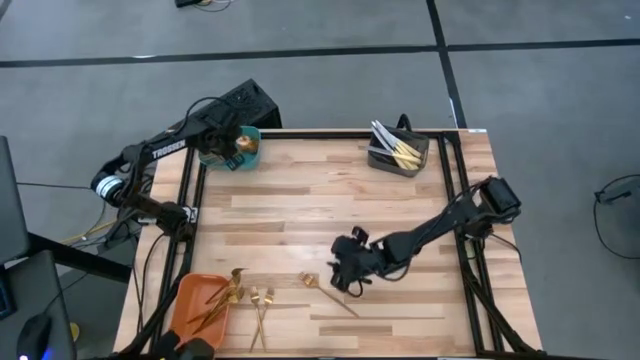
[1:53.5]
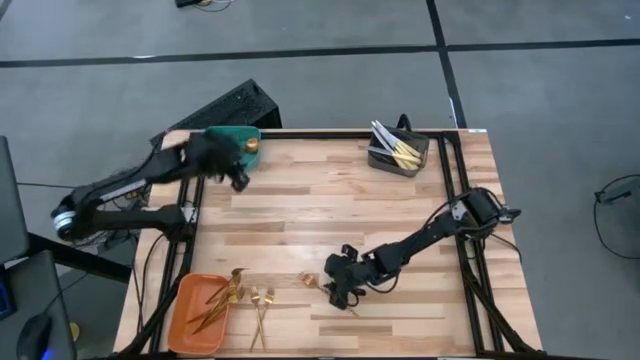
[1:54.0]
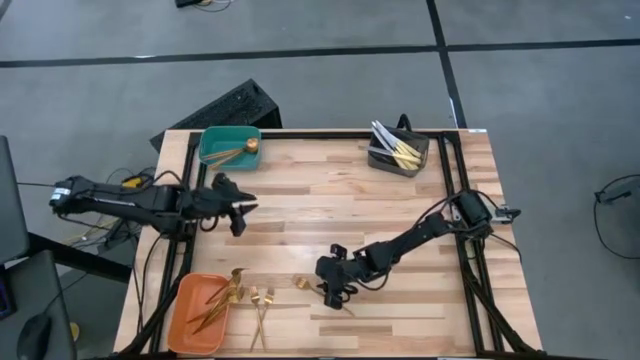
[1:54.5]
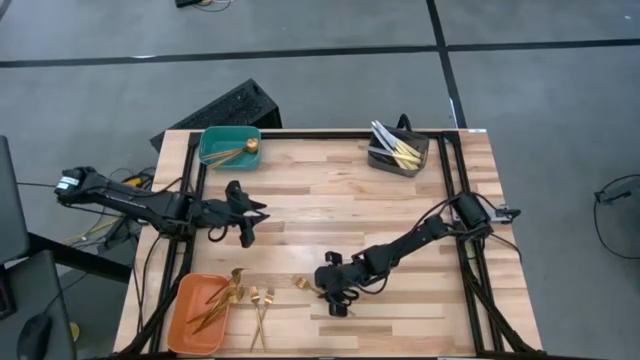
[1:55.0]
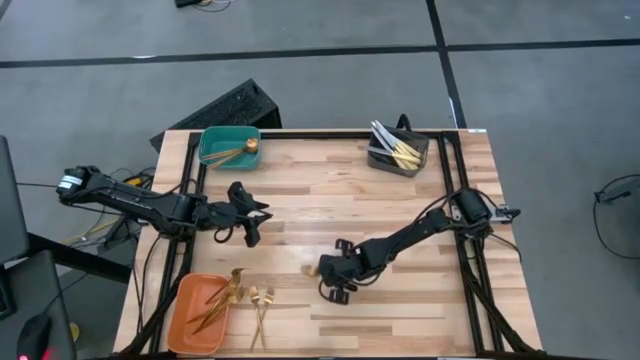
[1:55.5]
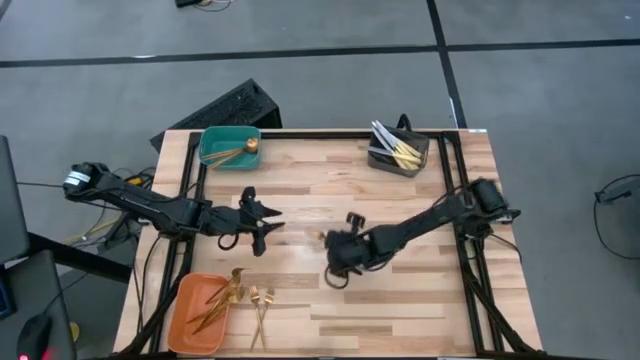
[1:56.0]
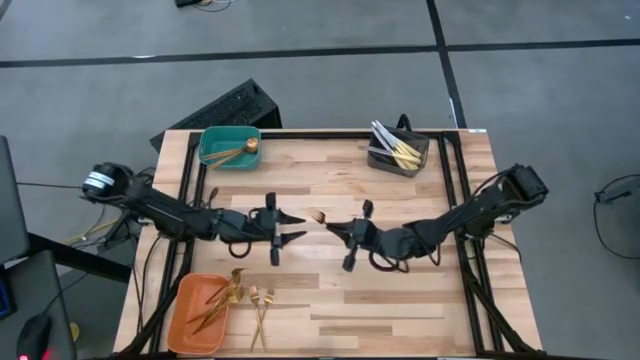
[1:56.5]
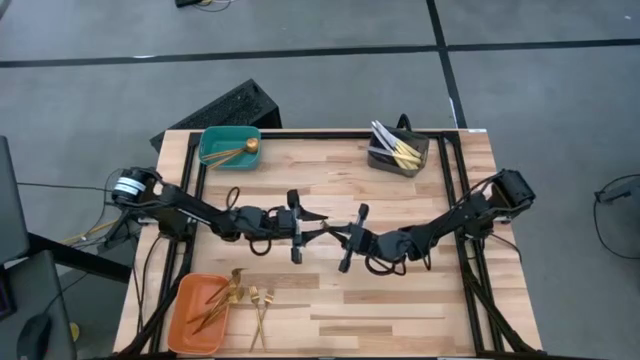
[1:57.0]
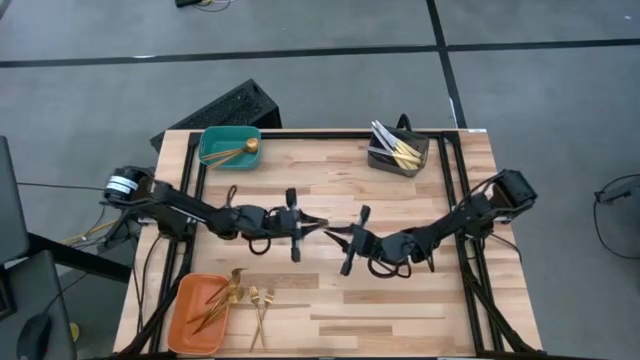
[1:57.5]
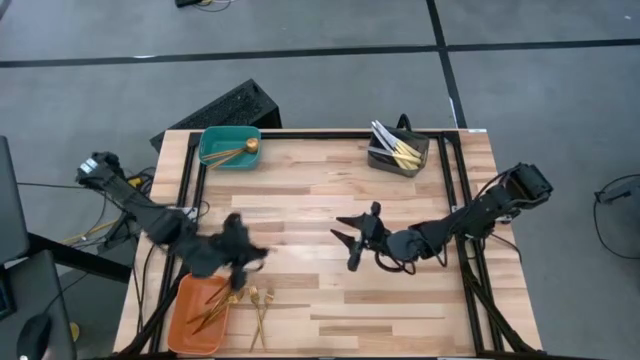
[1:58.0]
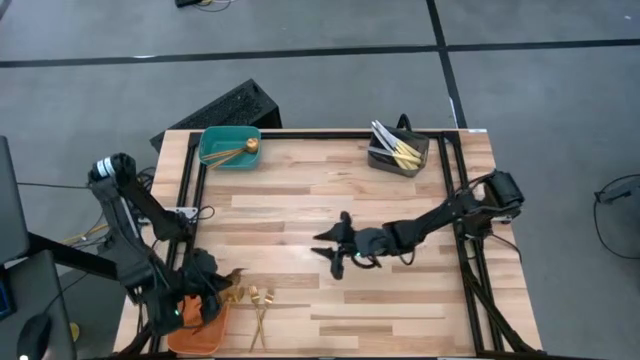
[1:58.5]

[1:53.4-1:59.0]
Task: Sort silverware by color (type)
Put the right fork into the orange bin

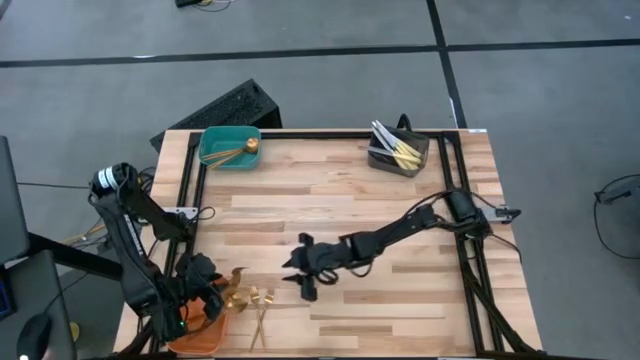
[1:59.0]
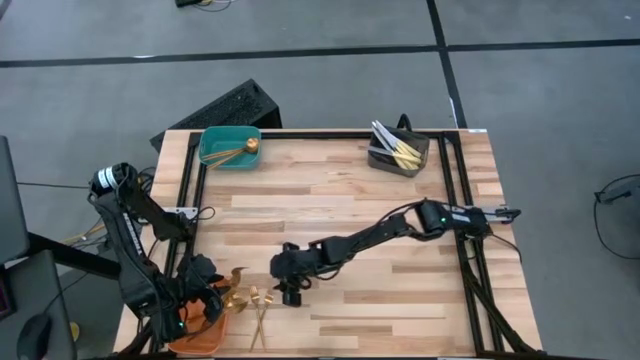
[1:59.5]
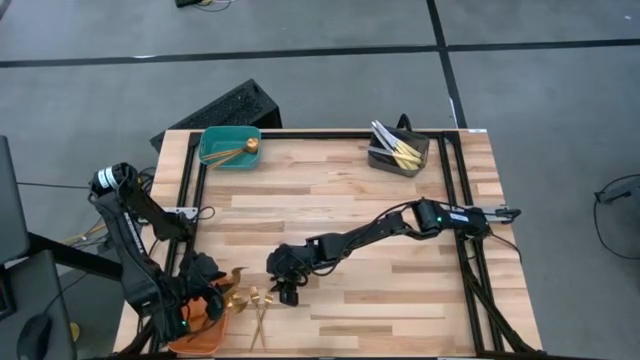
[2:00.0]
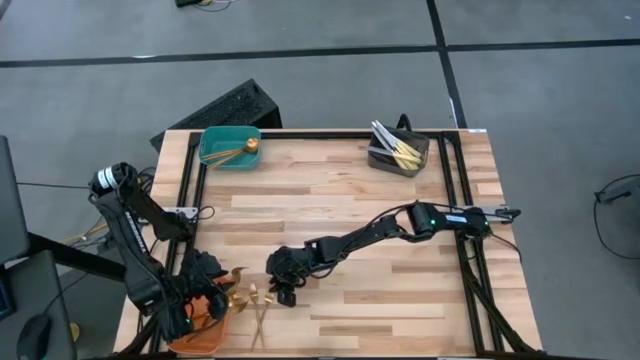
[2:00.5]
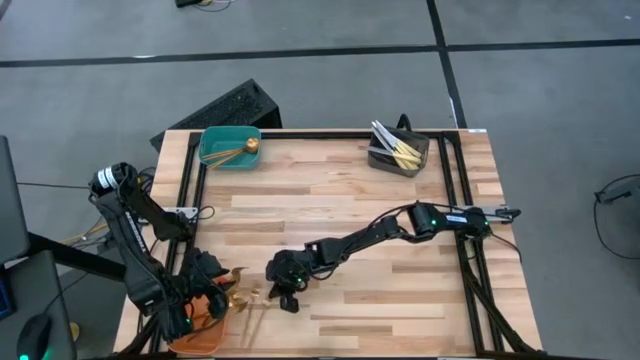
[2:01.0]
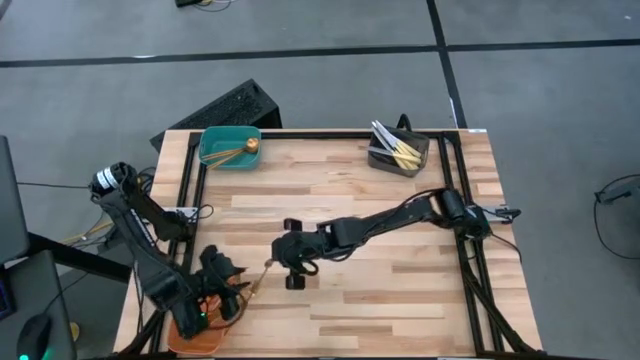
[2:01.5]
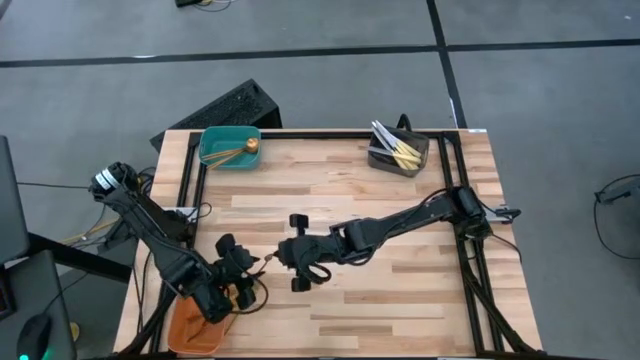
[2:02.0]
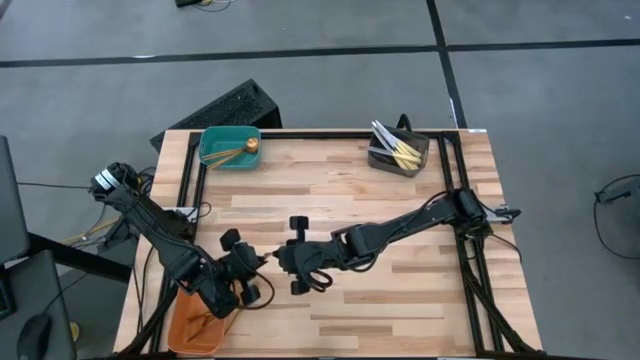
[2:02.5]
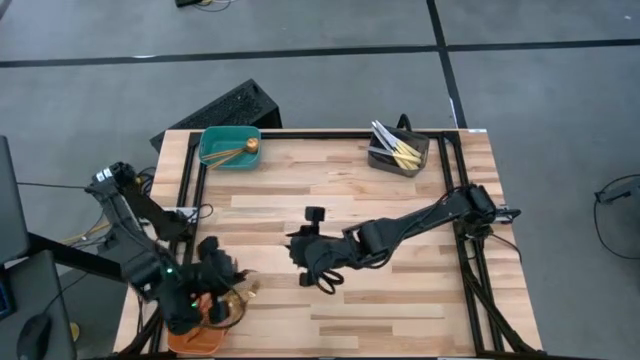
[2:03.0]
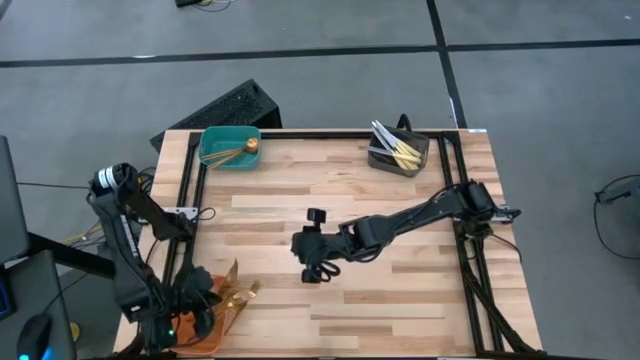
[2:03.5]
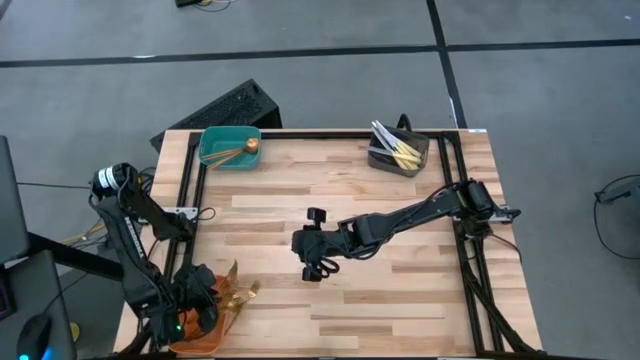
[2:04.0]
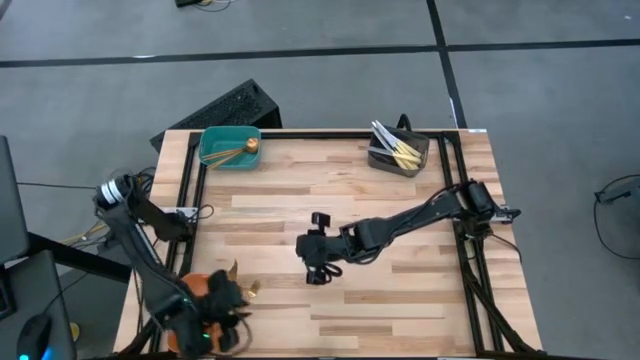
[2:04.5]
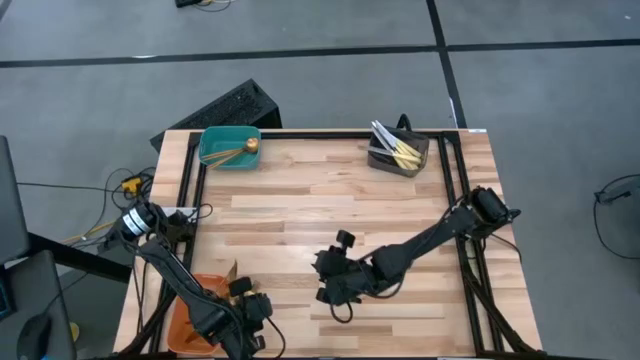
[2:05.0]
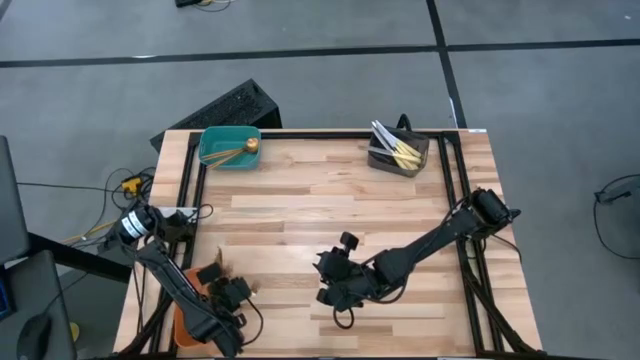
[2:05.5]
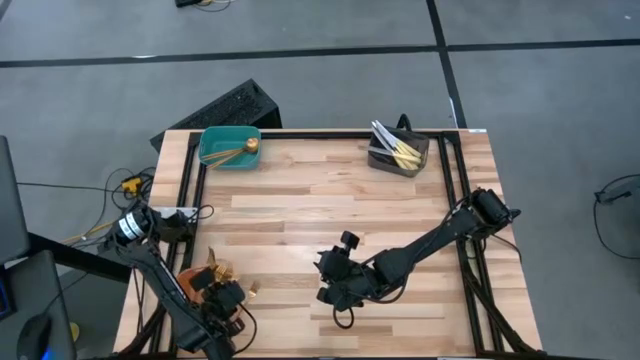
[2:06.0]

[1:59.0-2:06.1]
Put the right fork into the orange bin

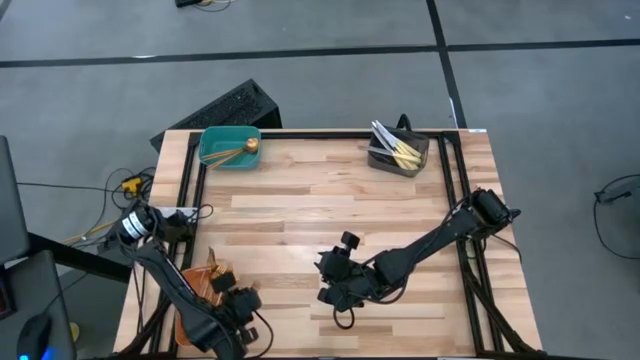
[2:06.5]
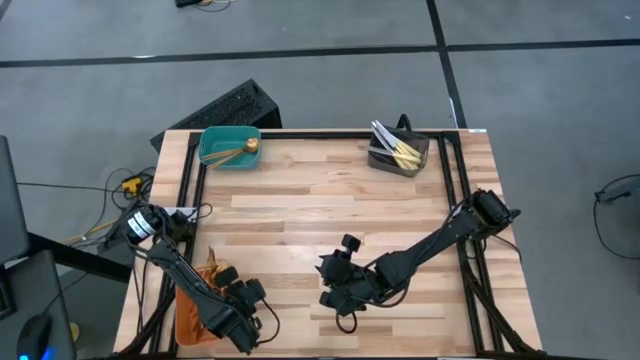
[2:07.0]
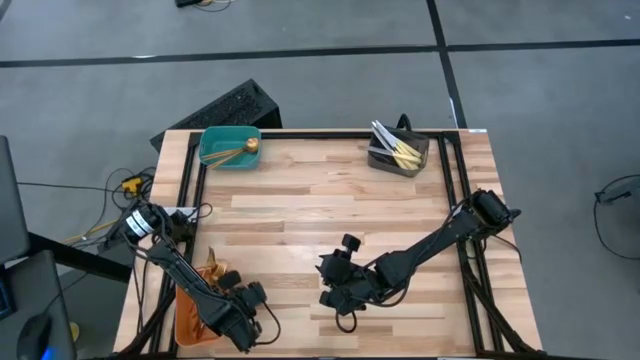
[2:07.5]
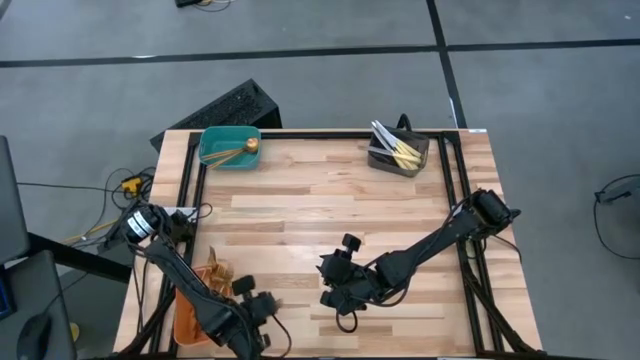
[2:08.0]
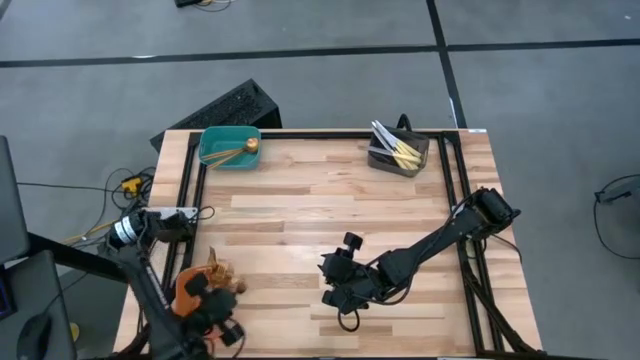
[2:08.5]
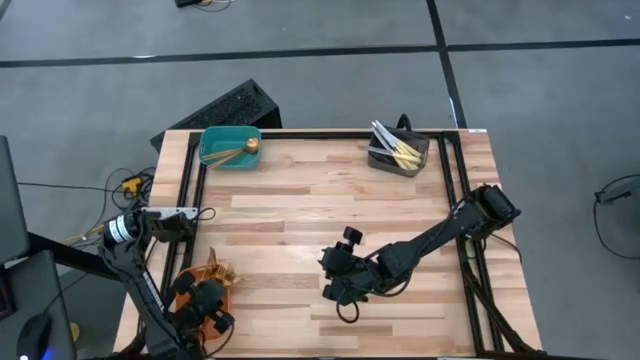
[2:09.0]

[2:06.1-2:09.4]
Put the fork into the orange bin

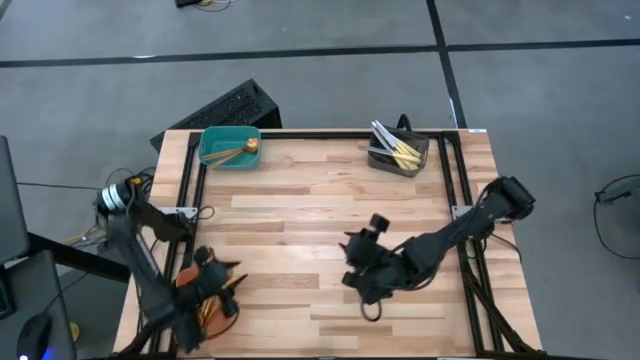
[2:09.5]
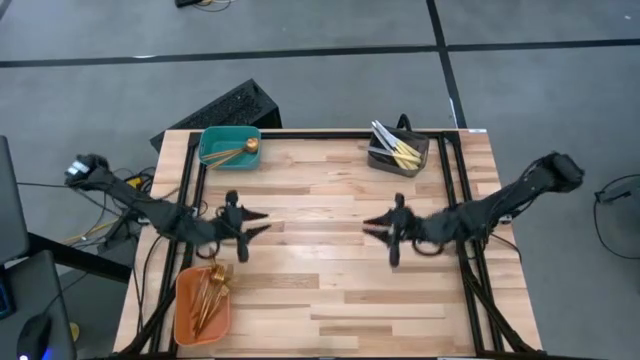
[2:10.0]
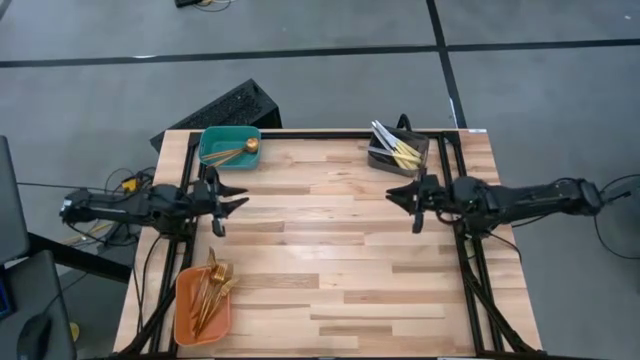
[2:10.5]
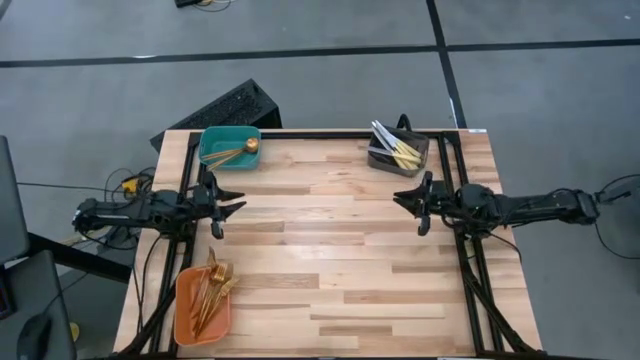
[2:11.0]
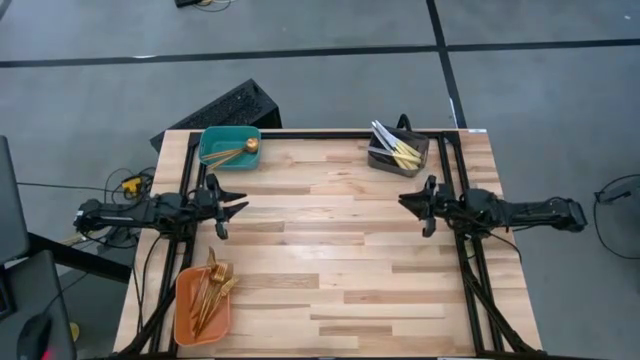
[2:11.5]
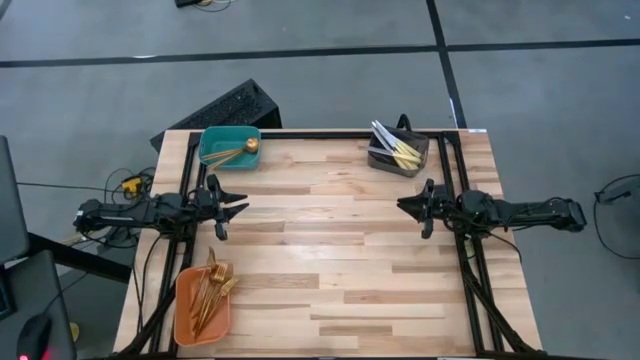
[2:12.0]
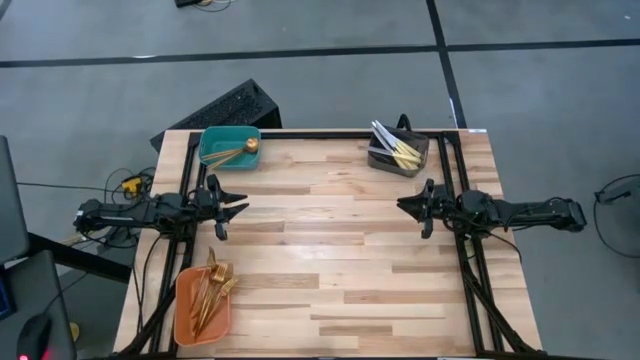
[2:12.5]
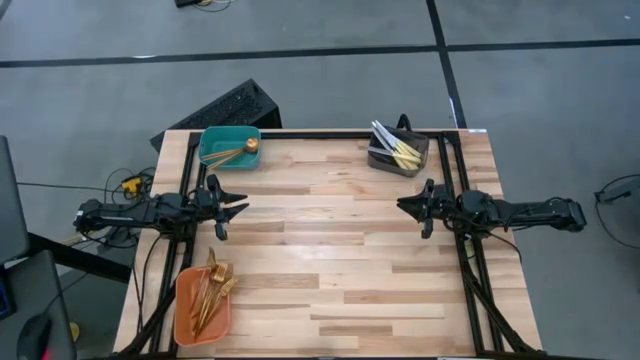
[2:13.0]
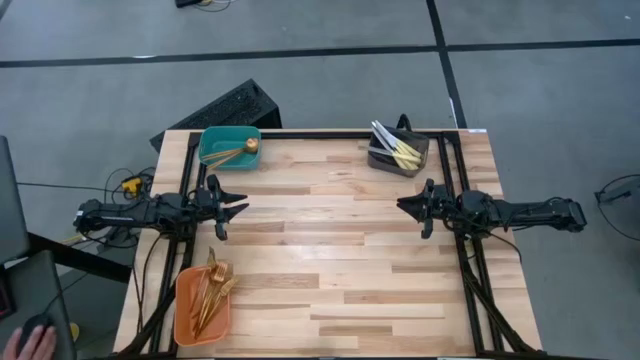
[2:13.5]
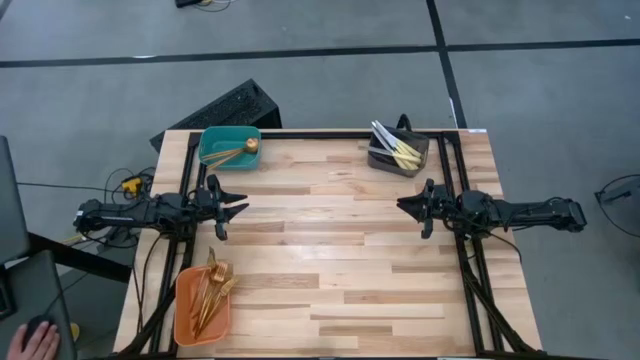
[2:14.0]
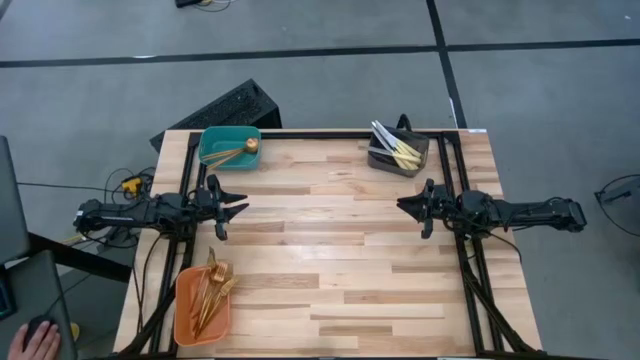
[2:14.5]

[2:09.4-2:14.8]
Return to Home Position
